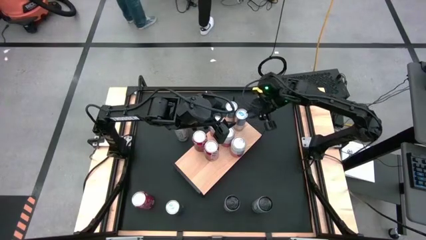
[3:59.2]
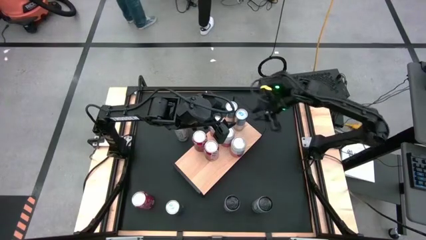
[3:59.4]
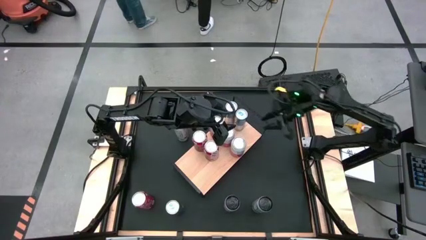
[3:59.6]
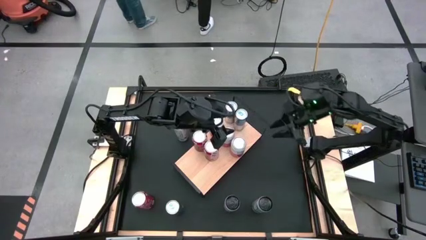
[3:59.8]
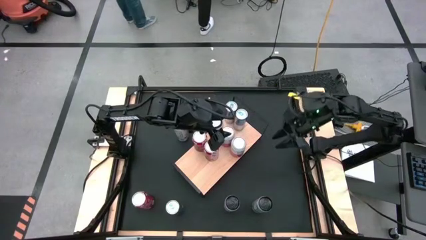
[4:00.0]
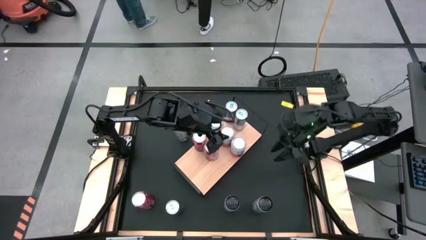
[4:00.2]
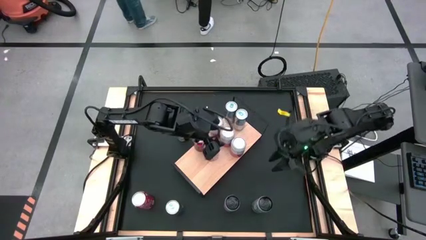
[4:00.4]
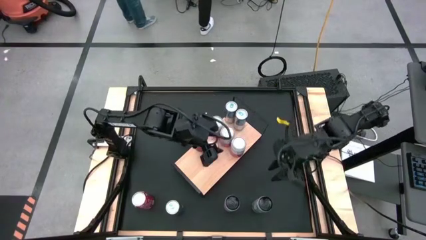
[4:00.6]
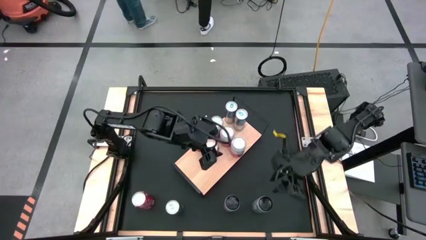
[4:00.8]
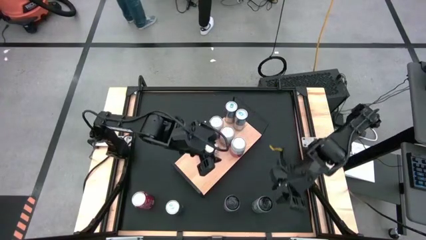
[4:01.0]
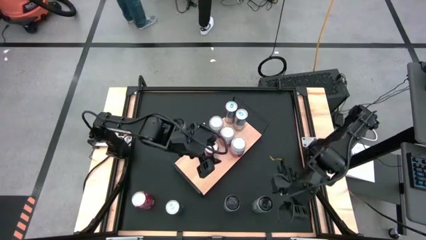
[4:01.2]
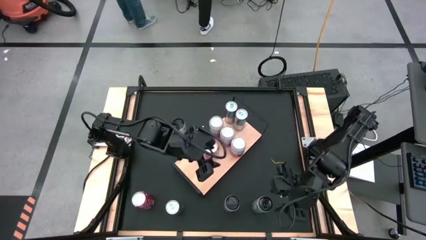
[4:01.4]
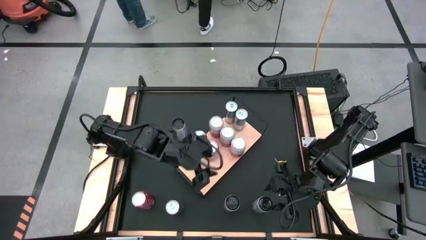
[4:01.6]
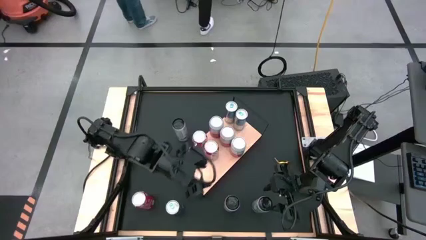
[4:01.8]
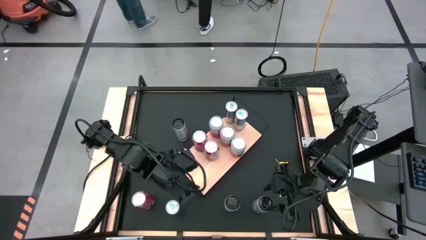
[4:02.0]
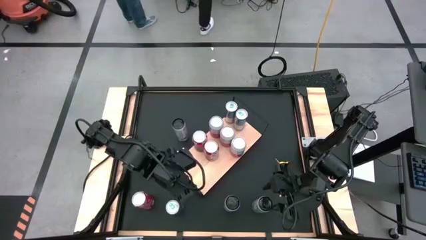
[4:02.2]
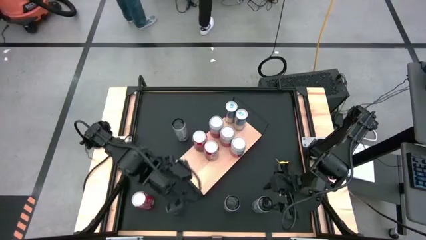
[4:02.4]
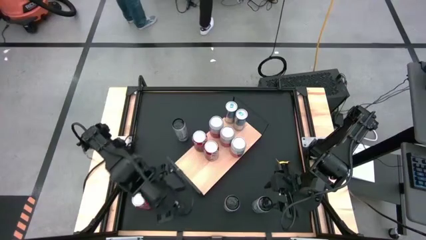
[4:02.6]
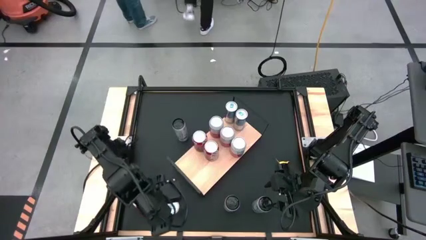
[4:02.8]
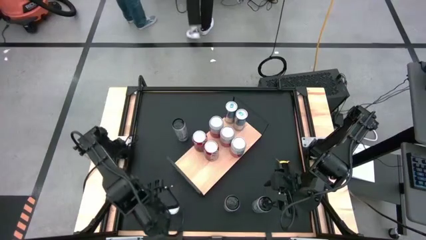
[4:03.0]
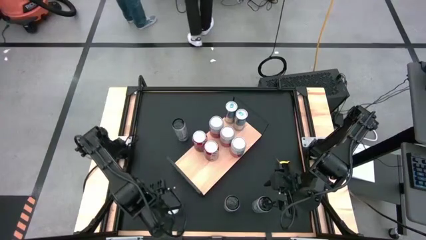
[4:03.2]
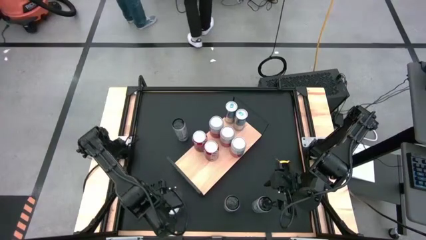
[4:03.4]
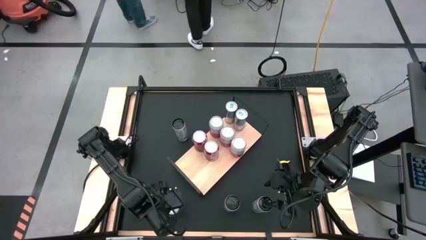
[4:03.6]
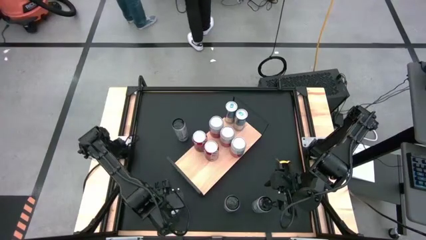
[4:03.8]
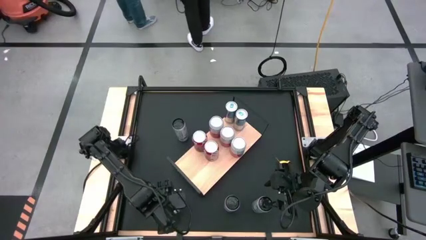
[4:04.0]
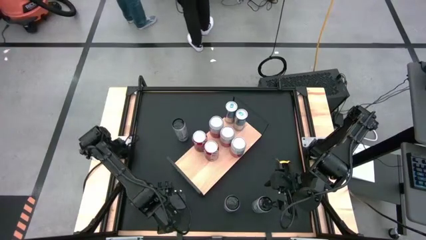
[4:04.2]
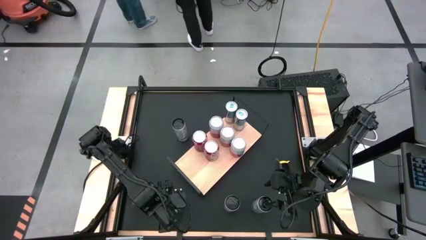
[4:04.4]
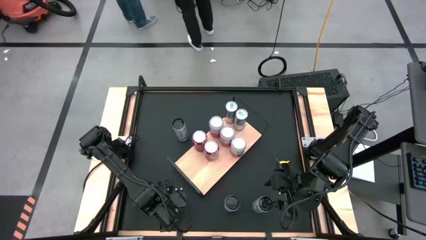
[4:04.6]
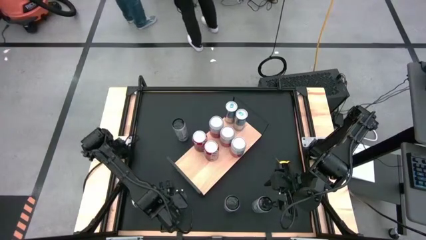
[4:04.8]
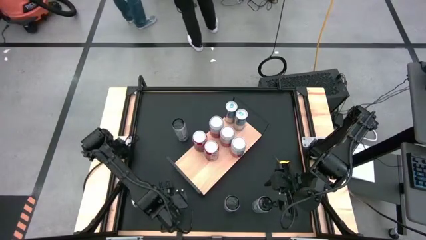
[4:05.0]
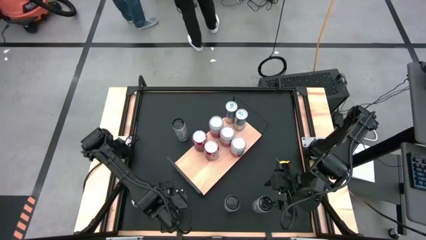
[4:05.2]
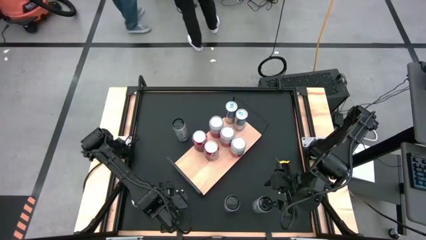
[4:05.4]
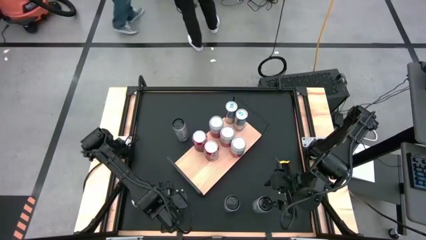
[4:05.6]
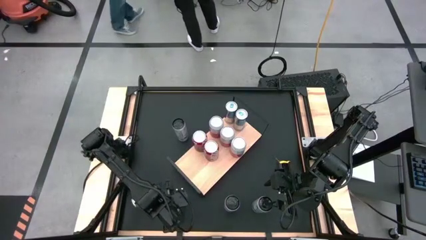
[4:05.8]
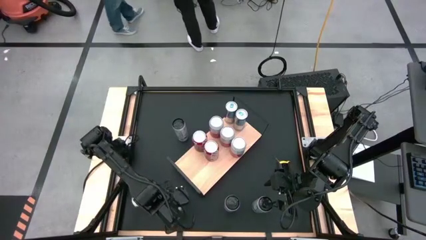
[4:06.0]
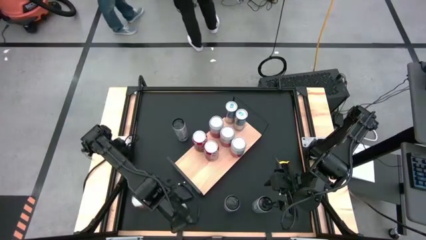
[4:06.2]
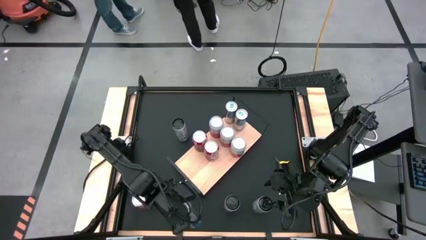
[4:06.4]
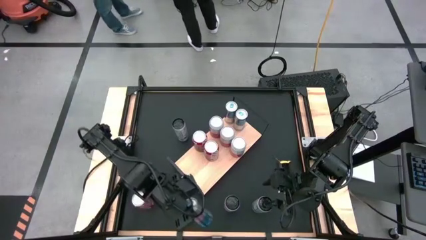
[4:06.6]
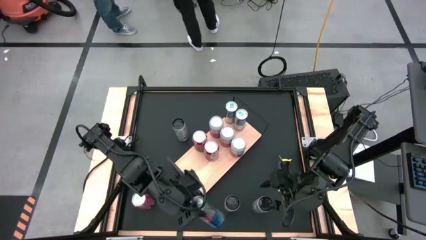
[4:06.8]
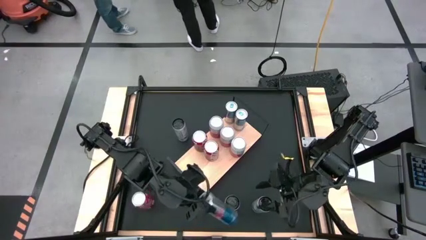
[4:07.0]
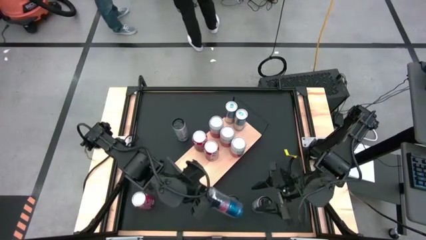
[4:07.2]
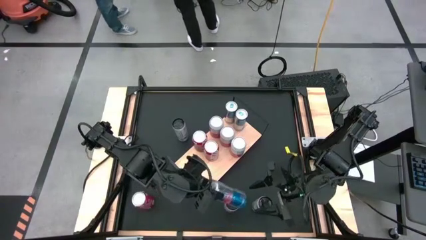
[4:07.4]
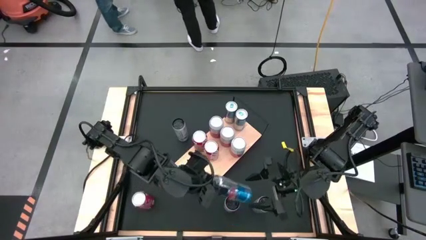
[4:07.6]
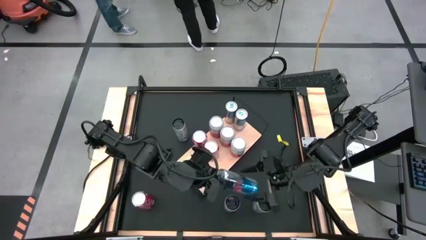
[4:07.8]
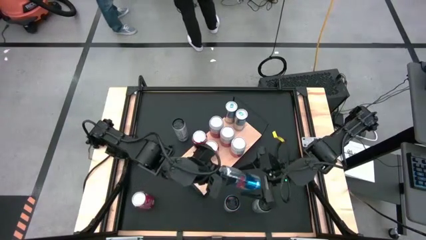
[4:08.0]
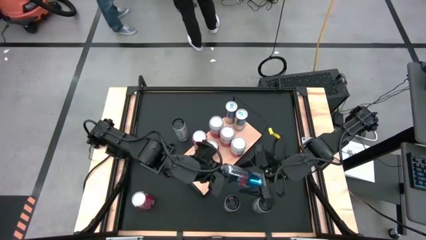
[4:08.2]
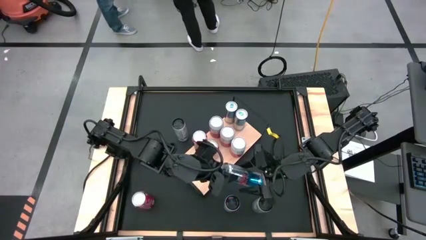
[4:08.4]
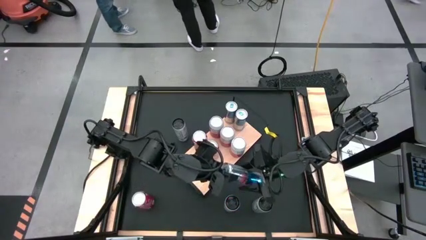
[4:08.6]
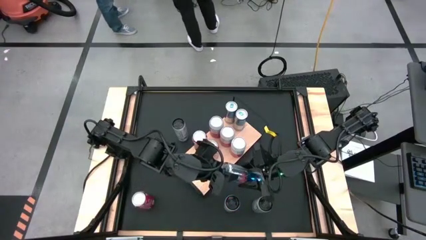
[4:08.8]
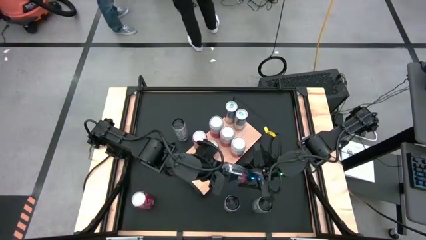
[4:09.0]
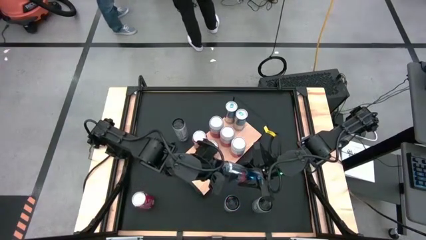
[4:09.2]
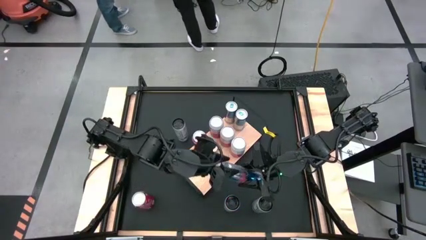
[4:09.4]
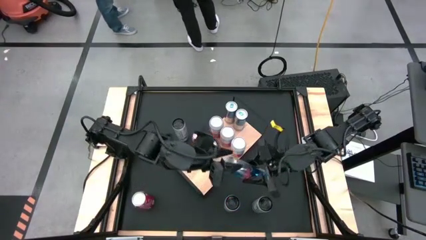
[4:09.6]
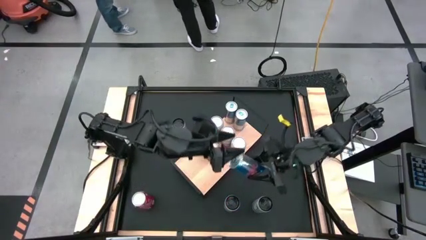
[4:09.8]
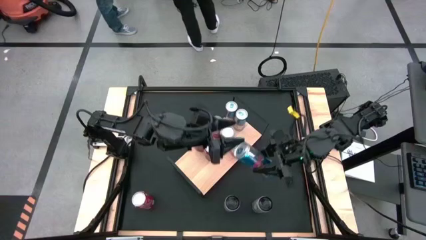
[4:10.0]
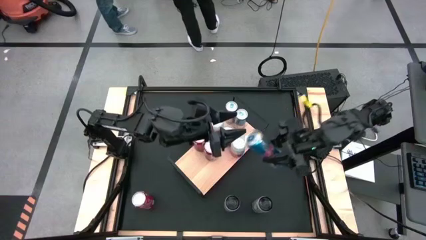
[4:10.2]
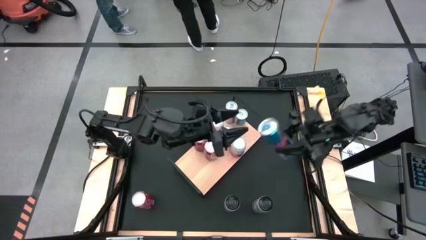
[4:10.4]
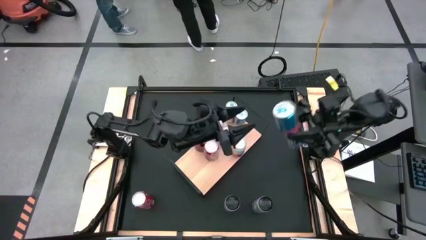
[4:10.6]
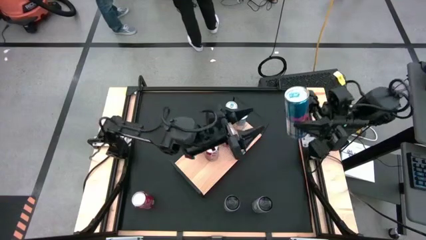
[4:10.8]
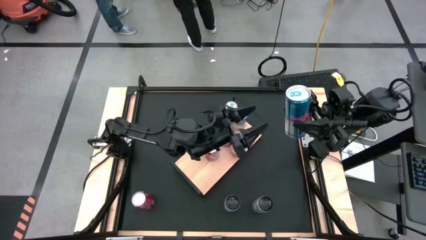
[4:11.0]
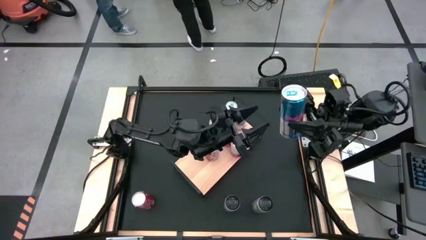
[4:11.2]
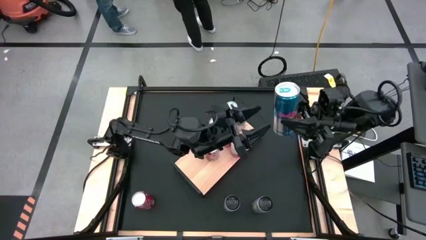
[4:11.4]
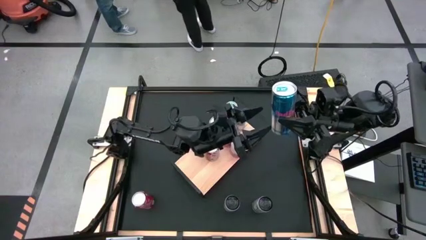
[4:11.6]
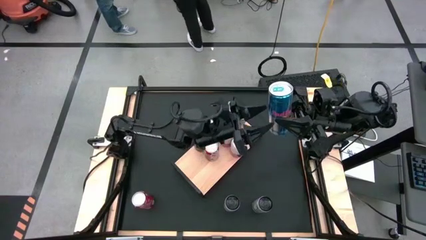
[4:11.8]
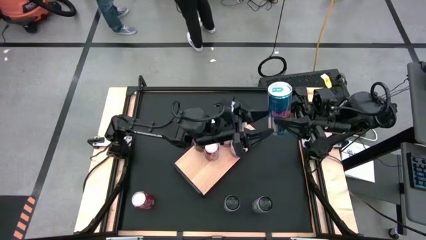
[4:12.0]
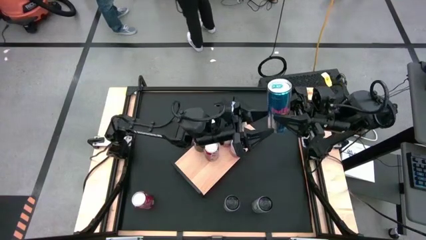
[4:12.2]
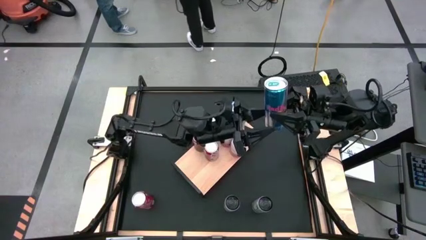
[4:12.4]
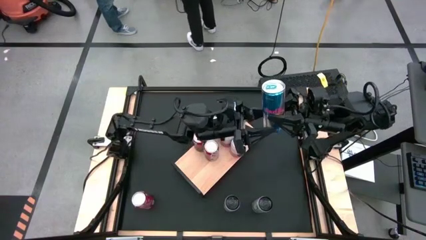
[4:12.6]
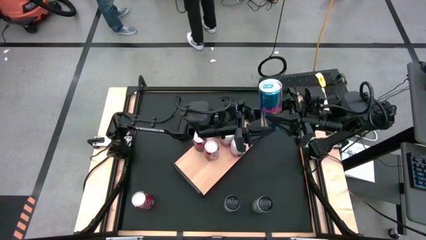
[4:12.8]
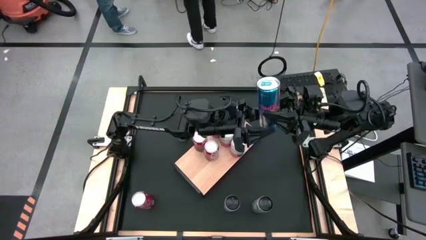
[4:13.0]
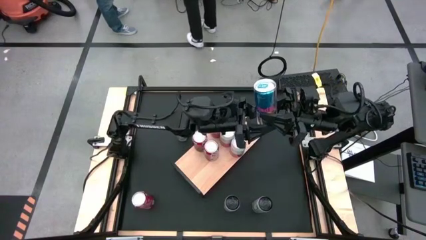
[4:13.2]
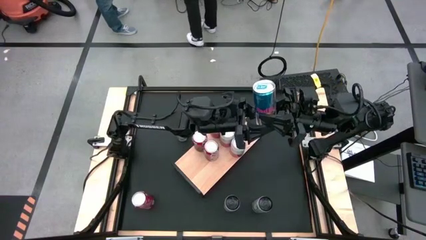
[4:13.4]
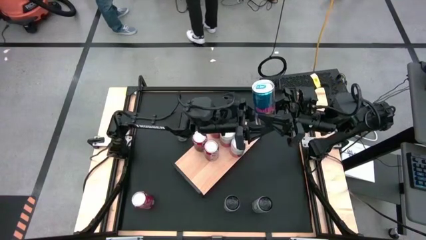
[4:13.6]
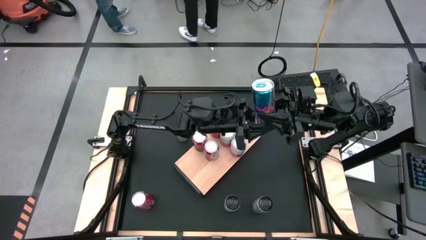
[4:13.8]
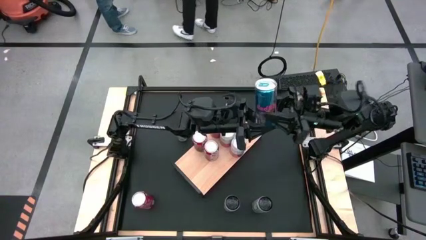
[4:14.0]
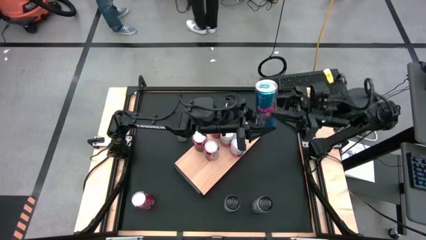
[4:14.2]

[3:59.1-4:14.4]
Task: Place canned beverage on shelf
Put the blue soda can on the shelf aligned with the other blue soda cans
